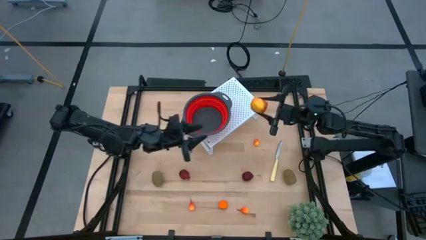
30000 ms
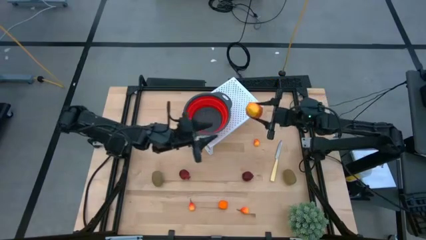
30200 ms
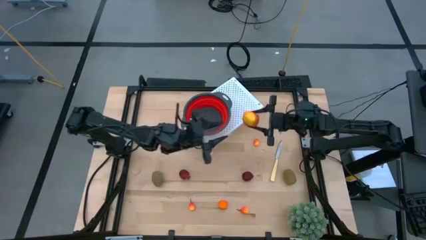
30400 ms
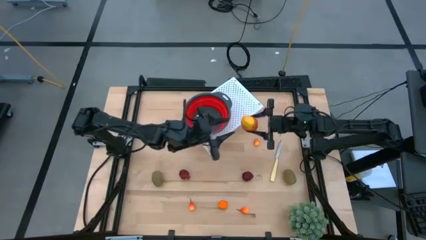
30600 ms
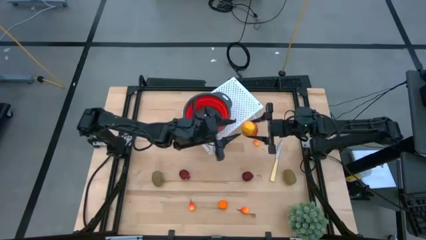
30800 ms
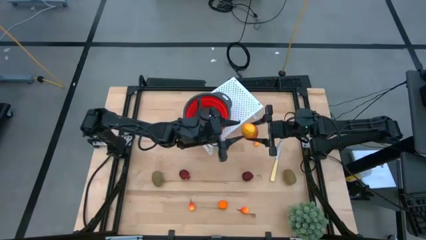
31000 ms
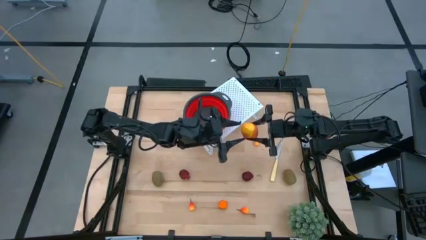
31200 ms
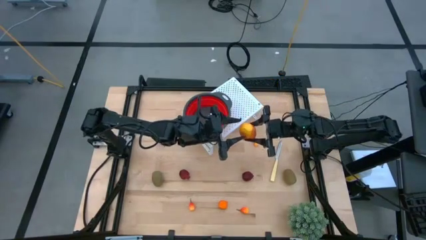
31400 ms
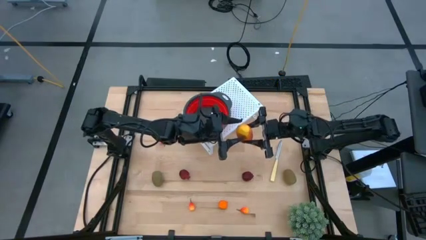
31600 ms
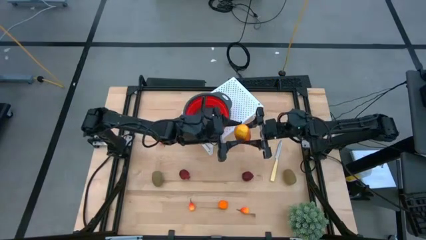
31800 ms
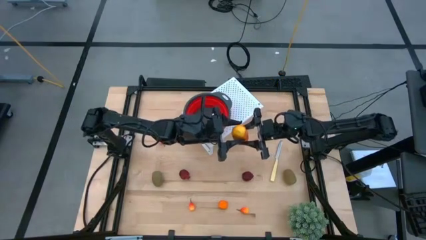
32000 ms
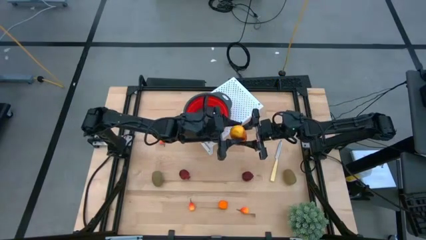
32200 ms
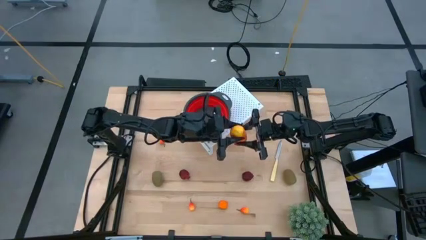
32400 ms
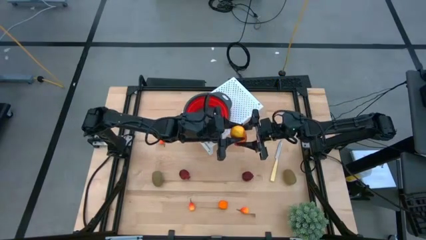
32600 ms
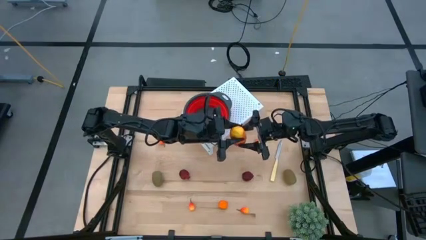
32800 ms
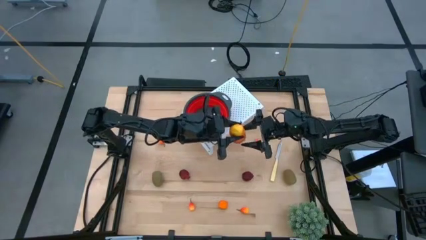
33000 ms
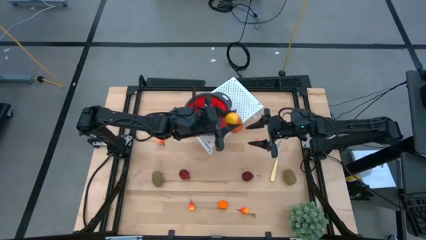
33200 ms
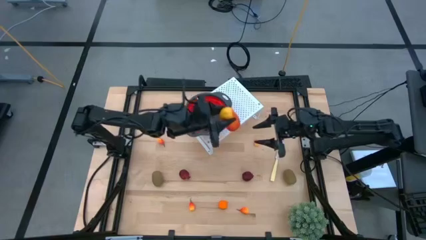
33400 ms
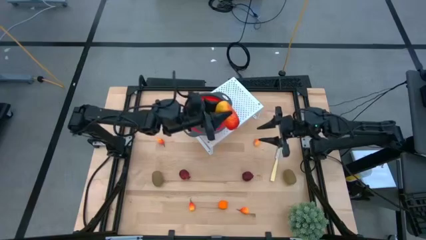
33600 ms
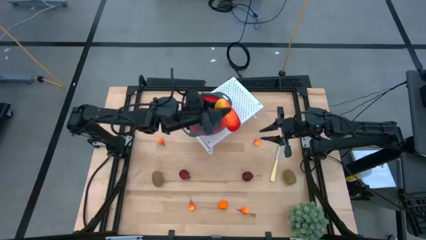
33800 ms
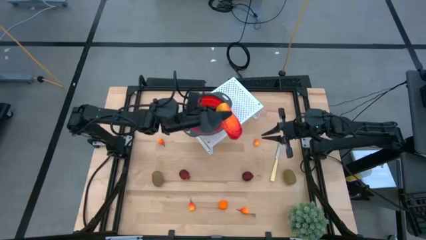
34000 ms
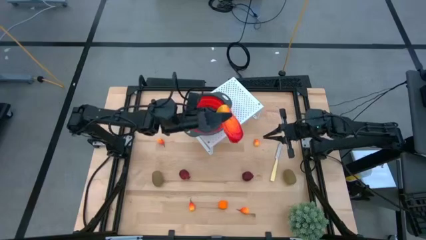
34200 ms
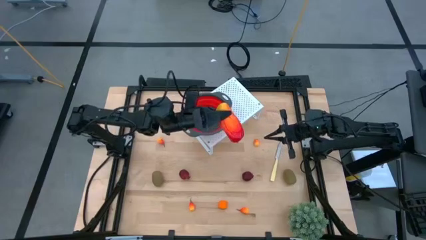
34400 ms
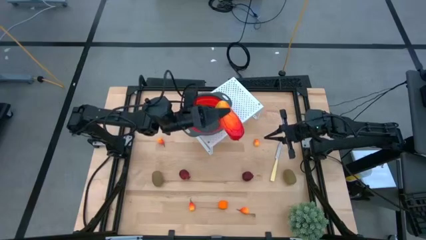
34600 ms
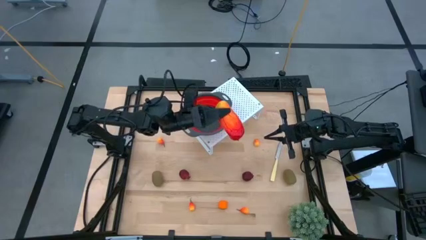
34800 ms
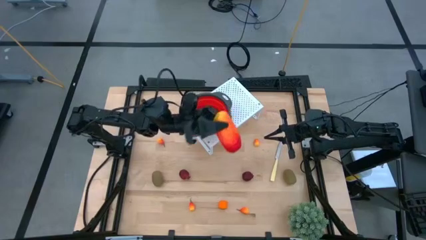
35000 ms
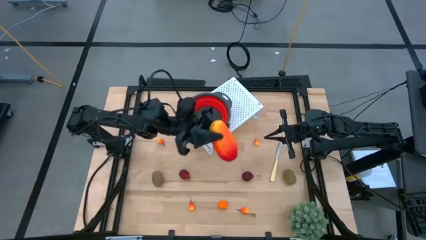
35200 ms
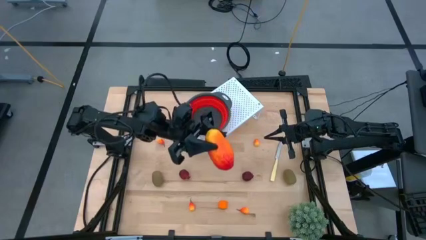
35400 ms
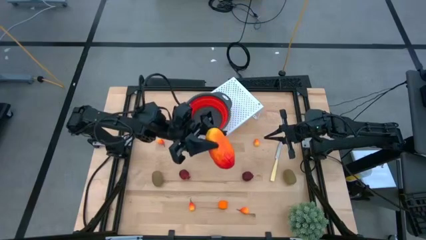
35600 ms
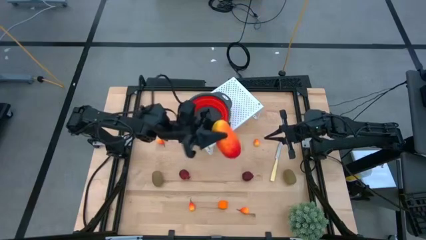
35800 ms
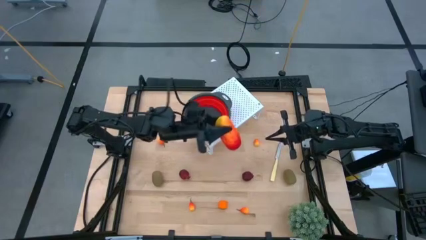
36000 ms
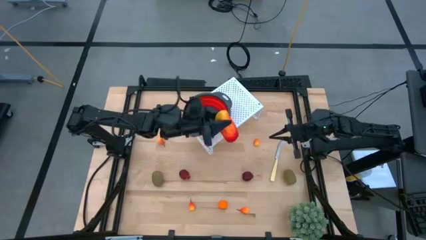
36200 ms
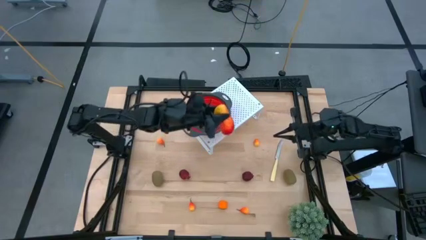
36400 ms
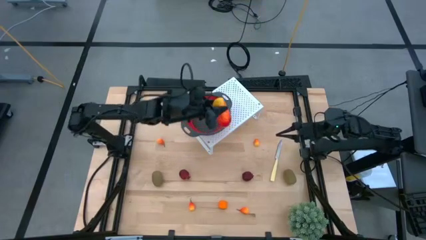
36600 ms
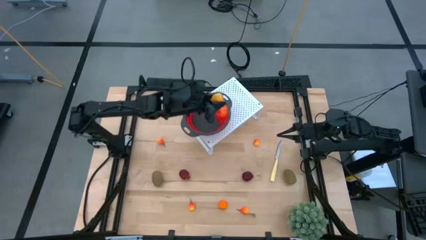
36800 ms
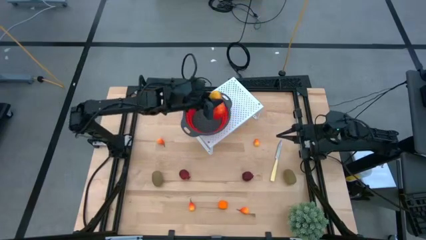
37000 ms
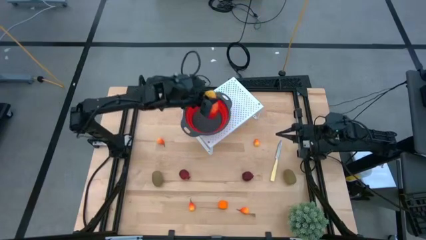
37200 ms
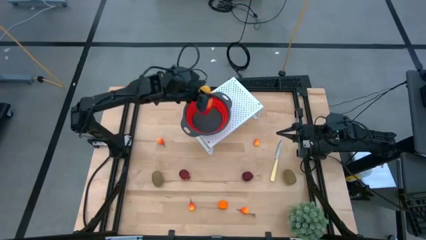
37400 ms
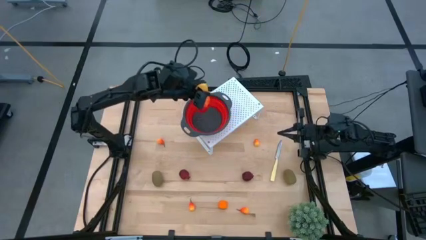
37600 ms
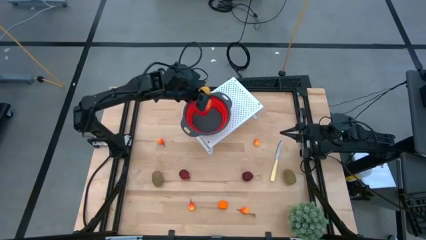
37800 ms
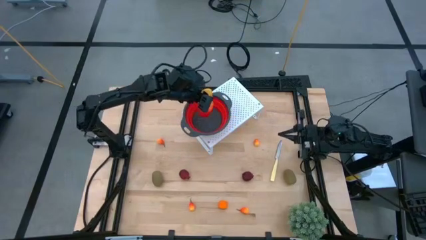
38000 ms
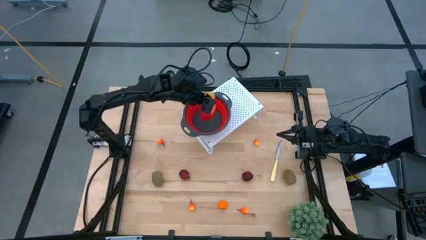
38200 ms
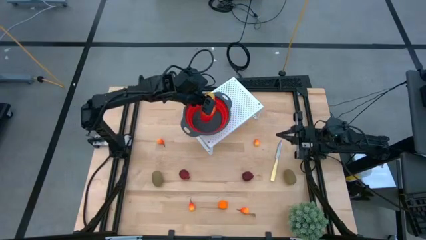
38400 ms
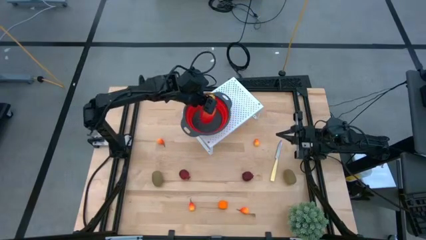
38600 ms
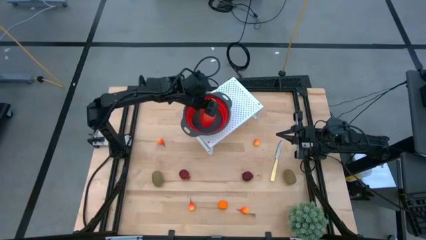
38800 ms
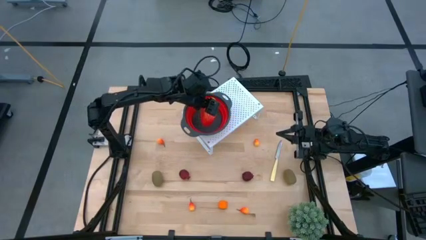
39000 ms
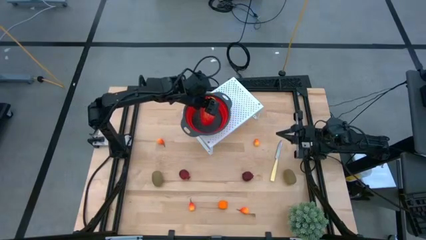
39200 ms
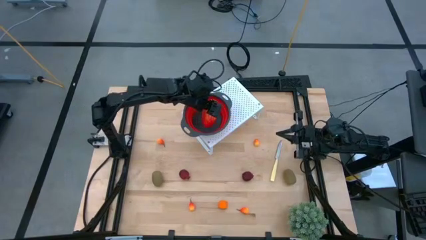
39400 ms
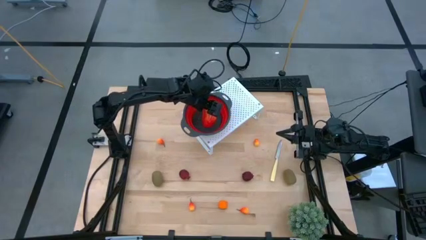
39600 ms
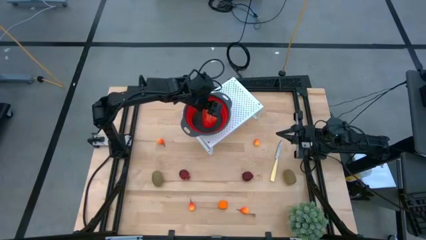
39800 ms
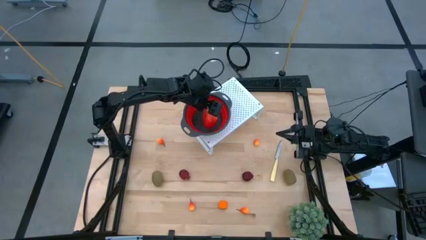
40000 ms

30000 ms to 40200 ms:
Task: Pick & Place Fruit
Put the mango into the red strainer bowl on the shelf

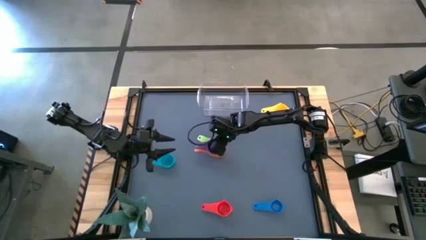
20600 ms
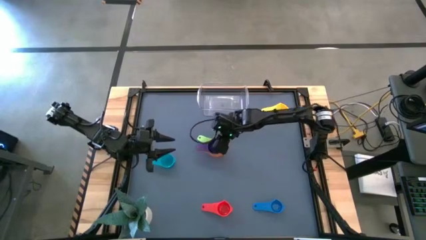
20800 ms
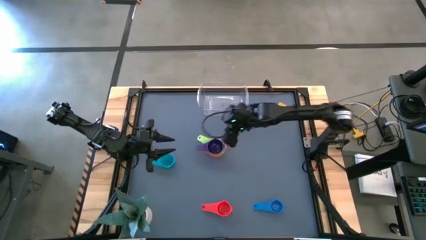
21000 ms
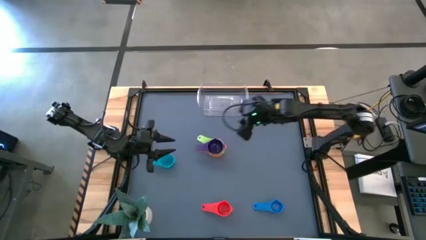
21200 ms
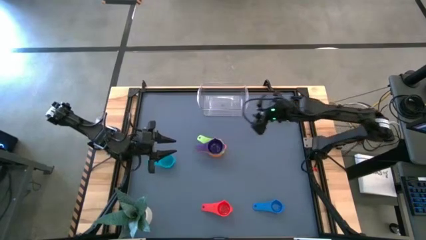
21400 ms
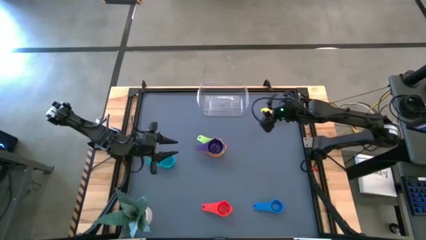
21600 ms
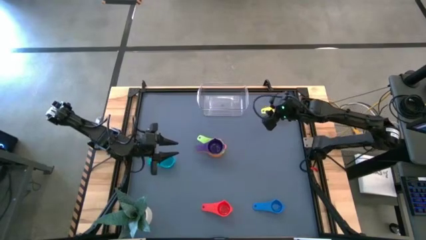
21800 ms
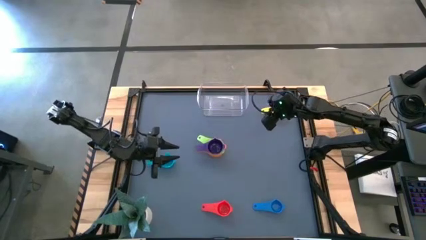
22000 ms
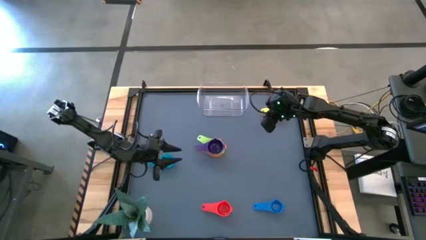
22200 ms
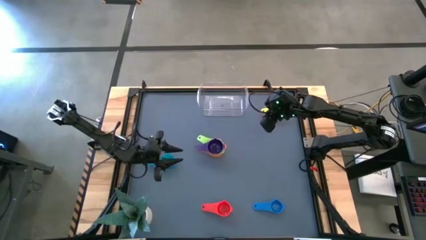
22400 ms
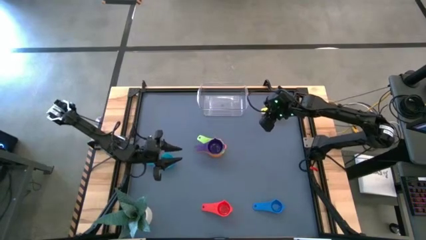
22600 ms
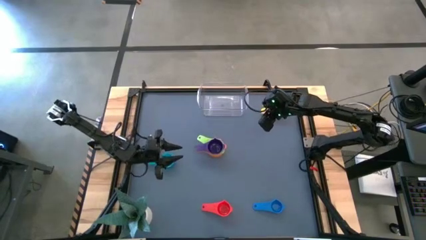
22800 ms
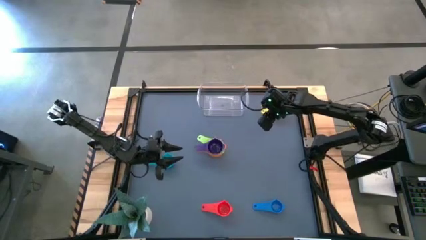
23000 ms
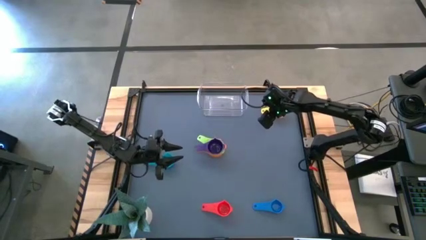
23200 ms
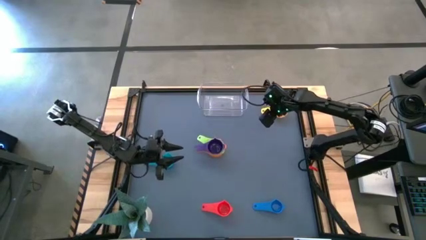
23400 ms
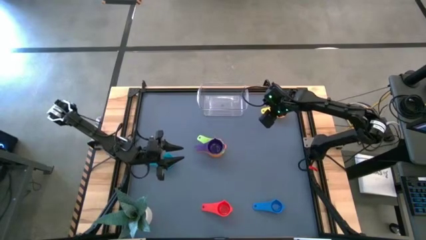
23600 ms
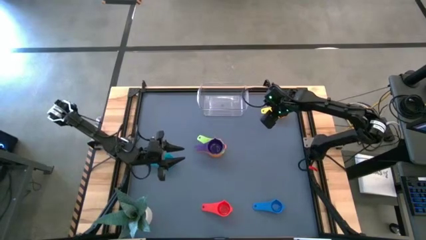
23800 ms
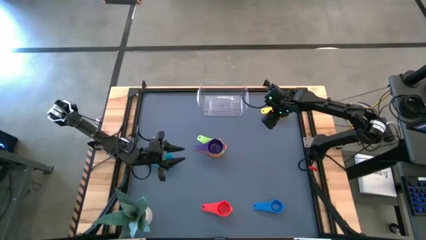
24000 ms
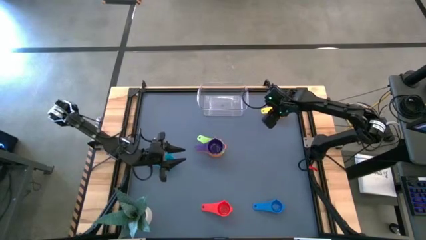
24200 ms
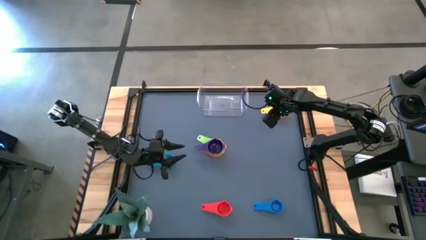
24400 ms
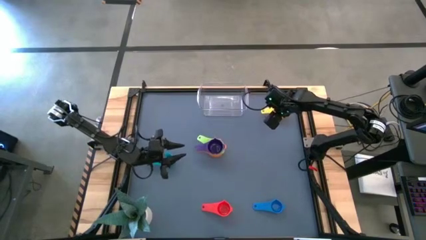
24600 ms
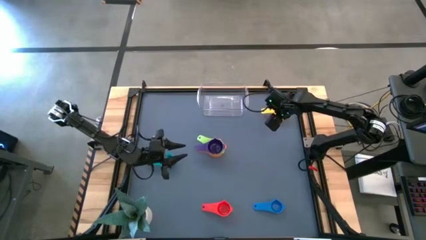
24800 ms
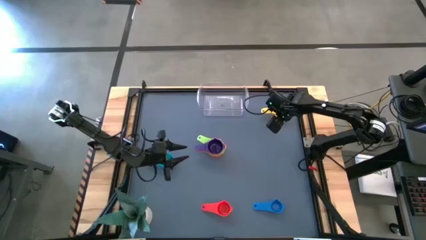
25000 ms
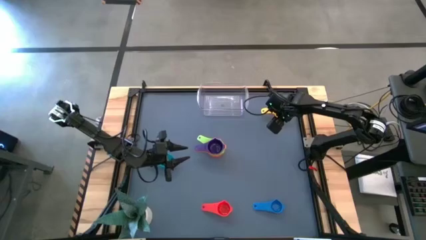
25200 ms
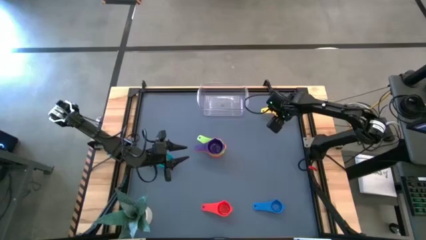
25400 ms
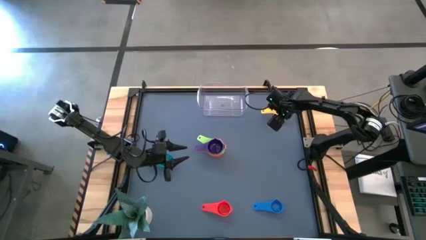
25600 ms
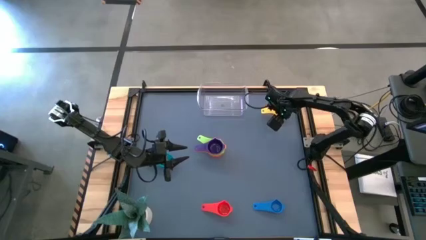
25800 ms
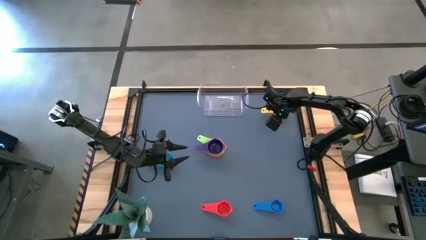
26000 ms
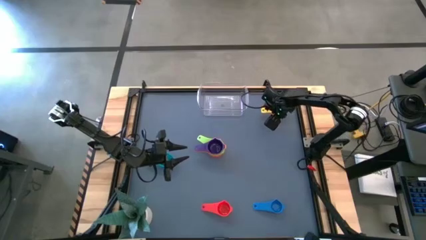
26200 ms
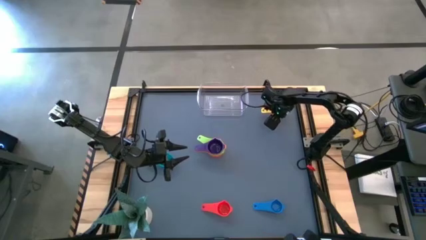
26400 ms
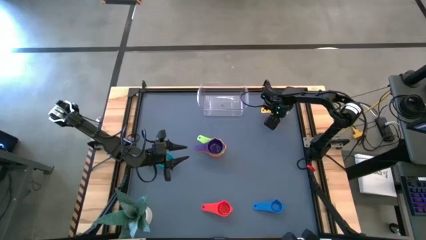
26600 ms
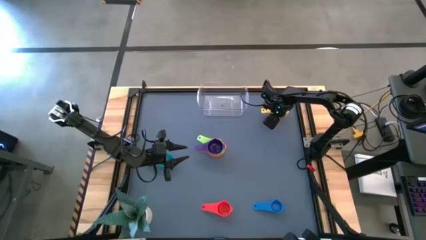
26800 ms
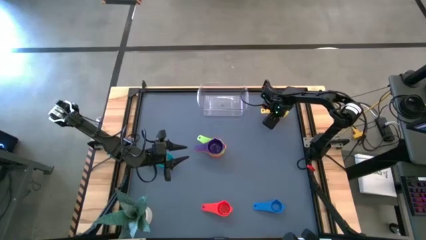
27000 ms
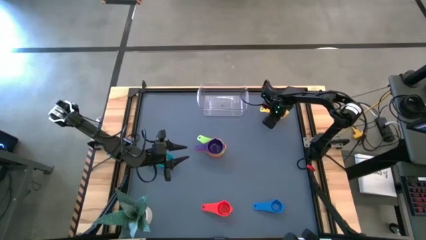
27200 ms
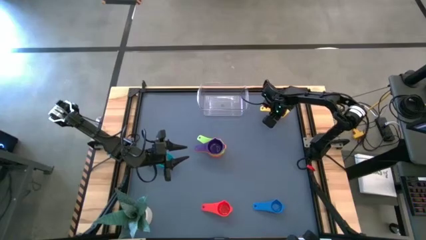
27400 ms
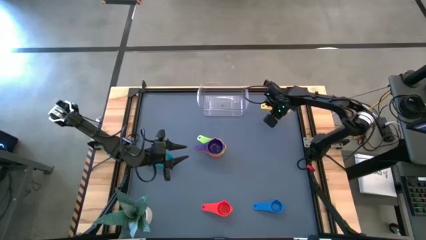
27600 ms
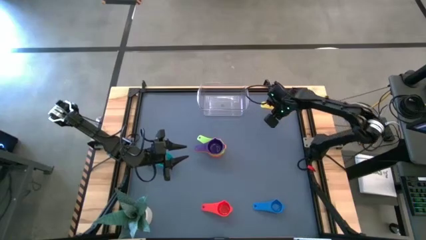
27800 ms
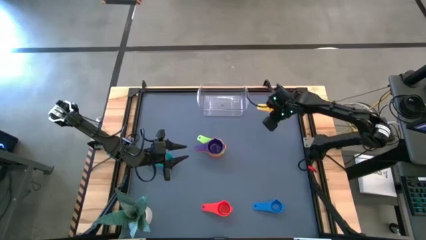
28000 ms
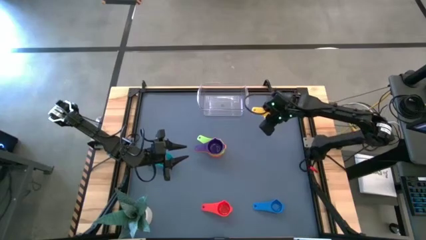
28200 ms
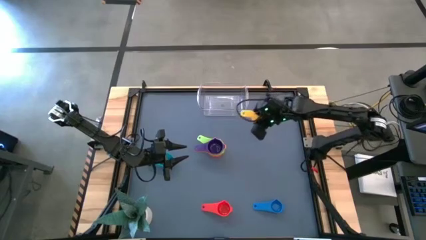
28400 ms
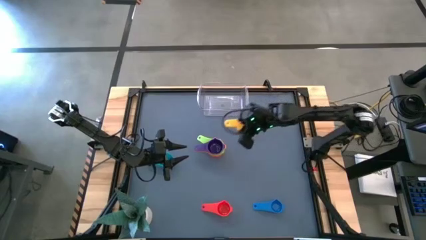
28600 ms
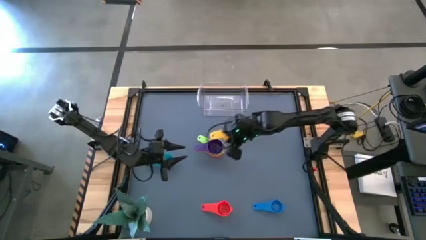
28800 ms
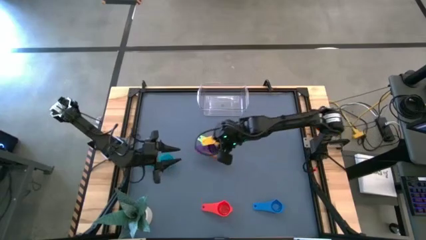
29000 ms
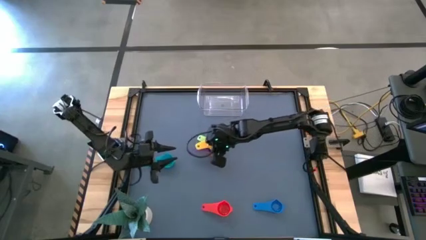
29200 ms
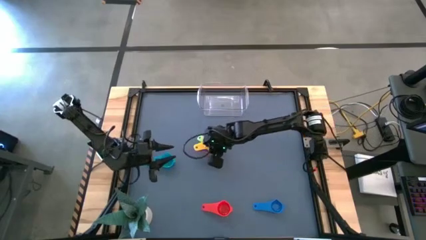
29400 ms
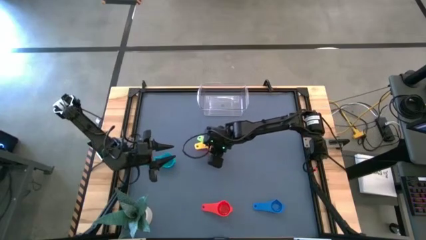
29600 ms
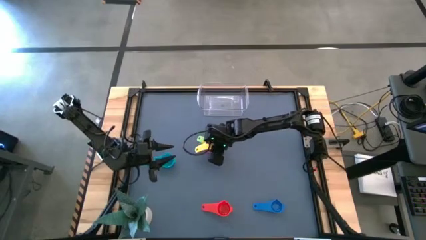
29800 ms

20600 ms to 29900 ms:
Task: Nest measuring cups in basket
Stack the yellow measuring cup on top of the purple measuring cup
